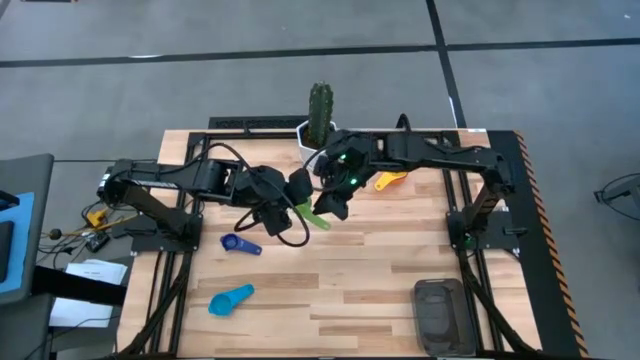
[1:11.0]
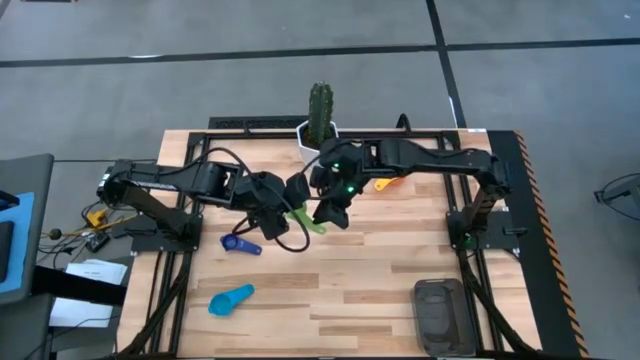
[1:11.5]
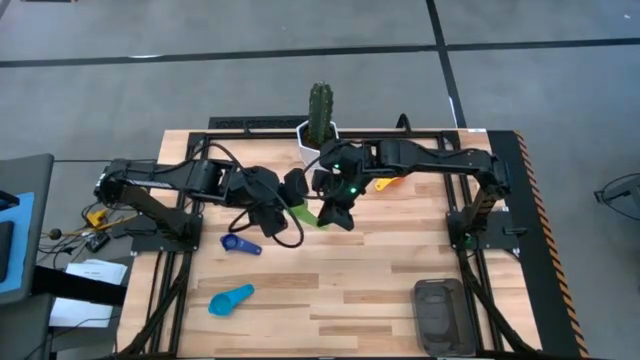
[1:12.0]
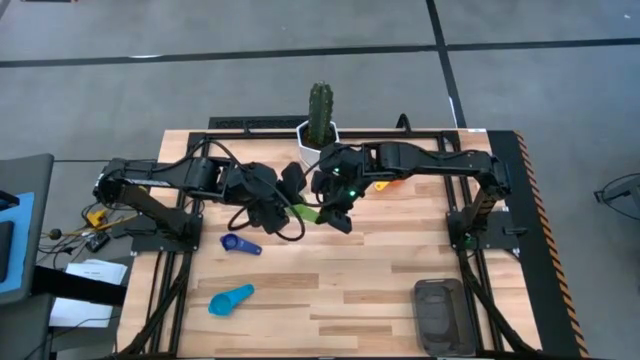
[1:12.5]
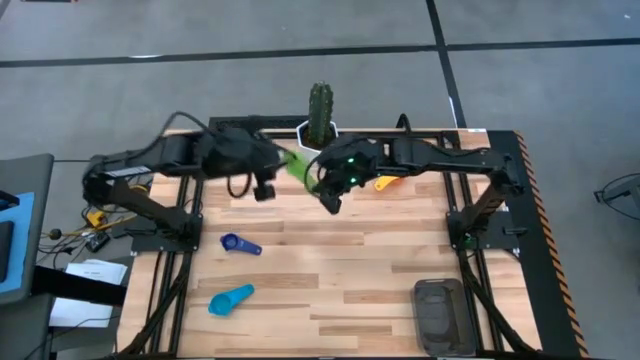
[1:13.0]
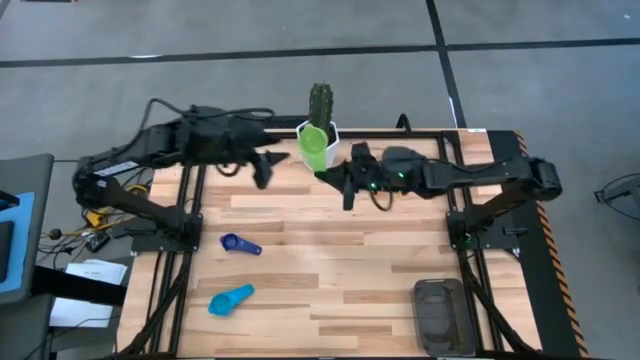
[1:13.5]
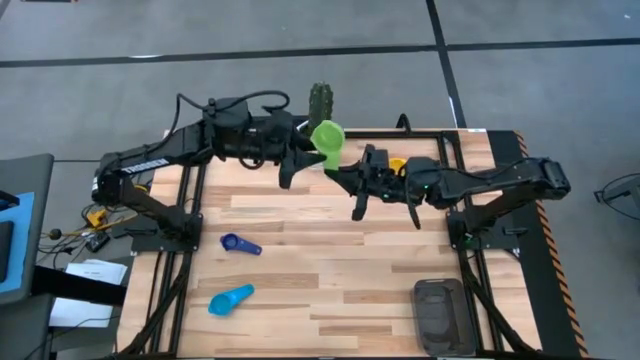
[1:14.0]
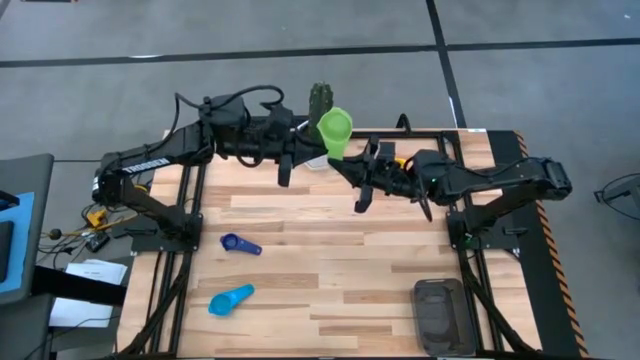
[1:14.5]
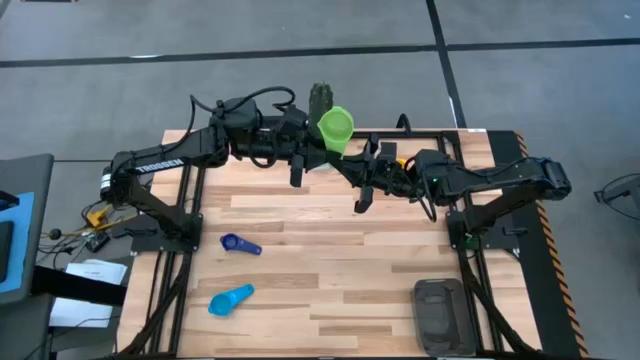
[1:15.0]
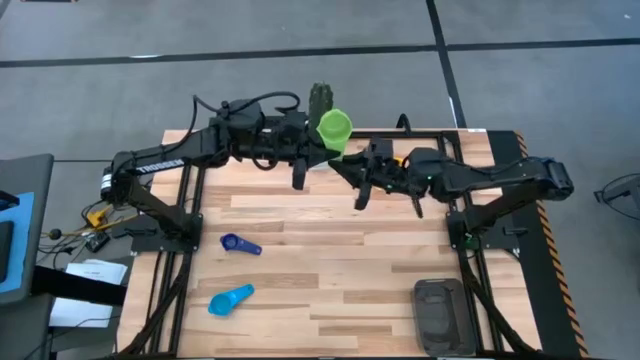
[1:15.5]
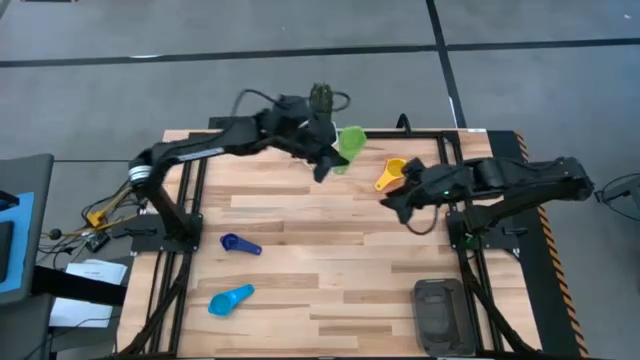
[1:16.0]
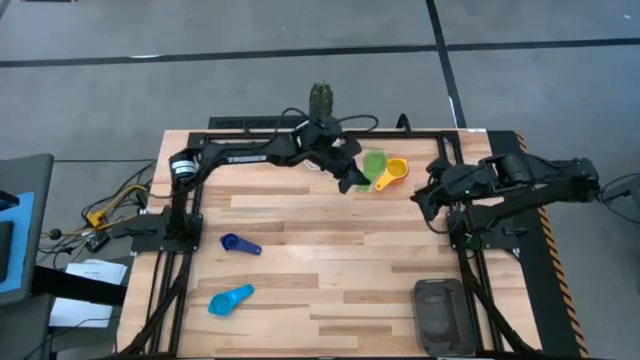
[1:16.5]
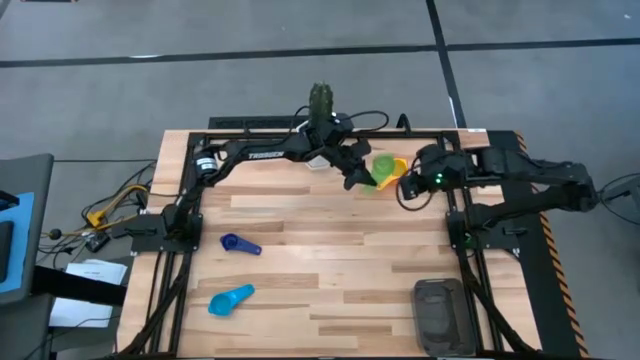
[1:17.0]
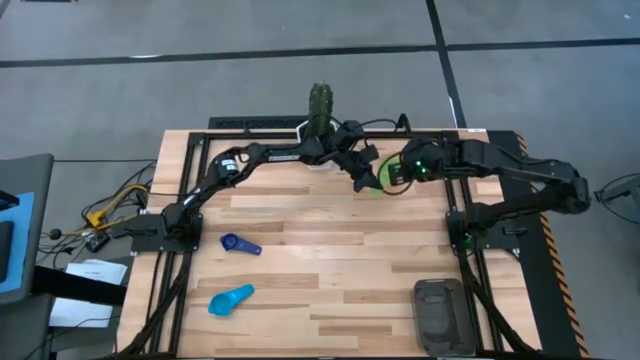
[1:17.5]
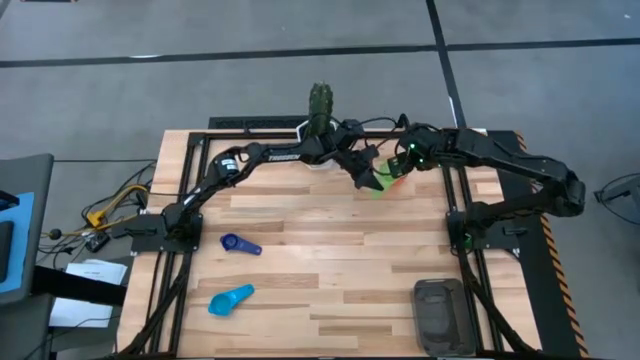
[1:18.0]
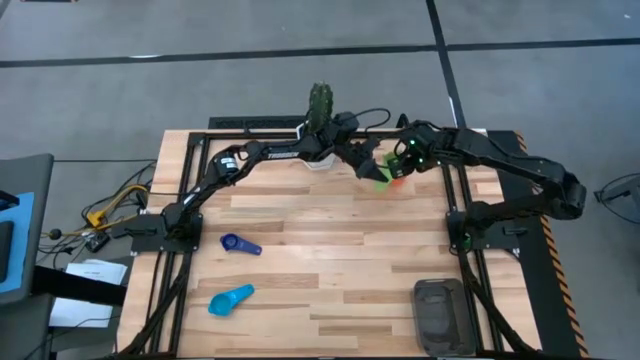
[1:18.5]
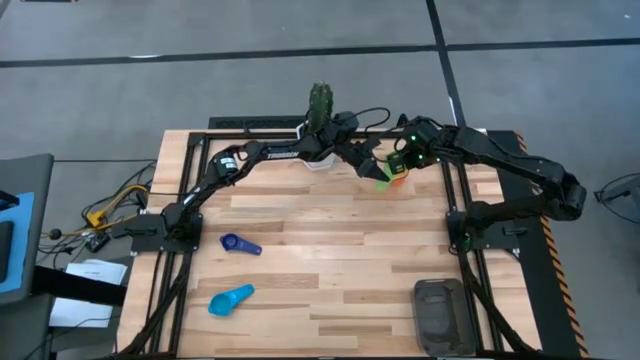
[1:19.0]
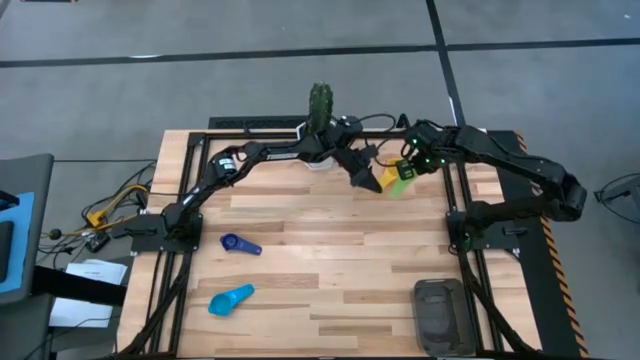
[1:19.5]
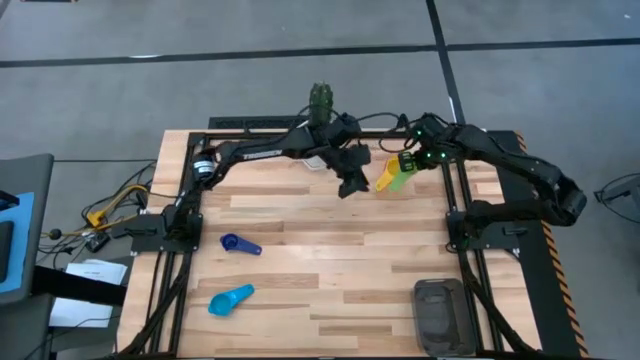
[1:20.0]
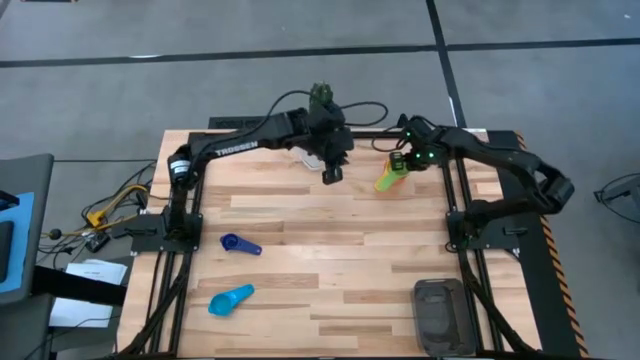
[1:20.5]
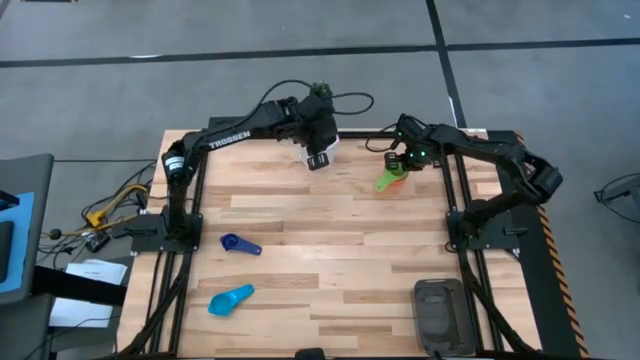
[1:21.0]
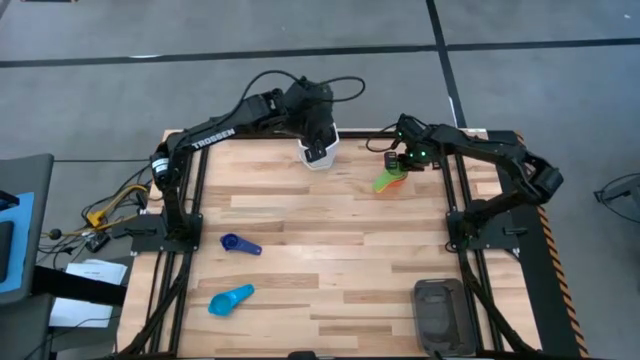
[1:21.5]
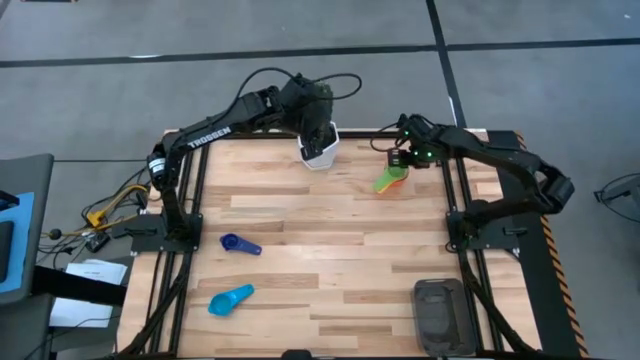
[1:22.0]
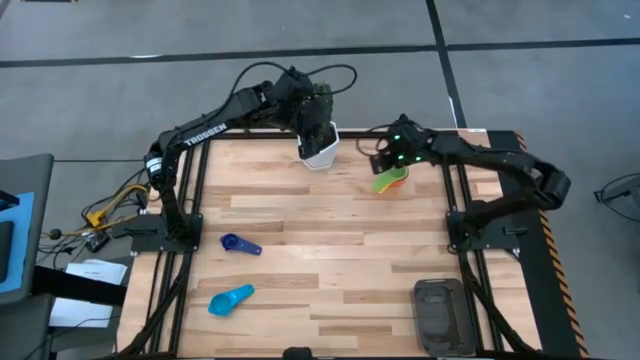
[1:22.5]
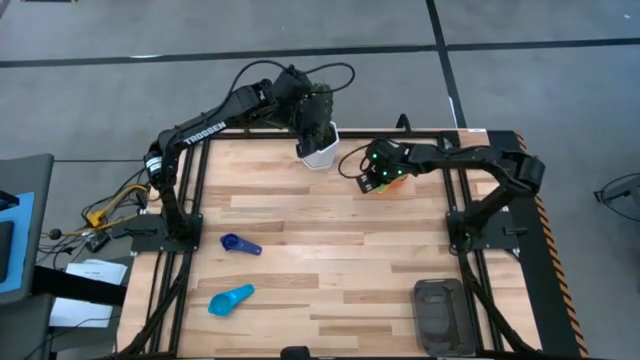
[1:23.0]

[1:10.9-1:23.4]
Task: Nest measuring cups in basket
Stack the green measuring cup on top of the yellow measuring cup

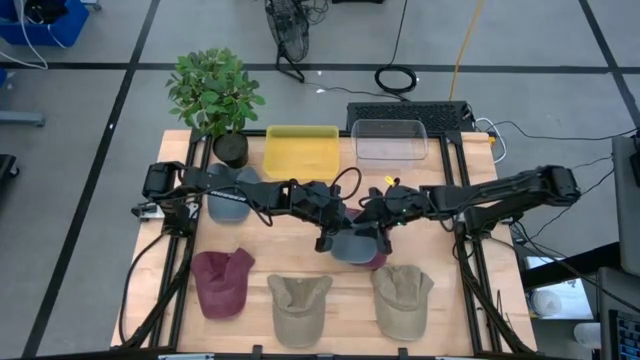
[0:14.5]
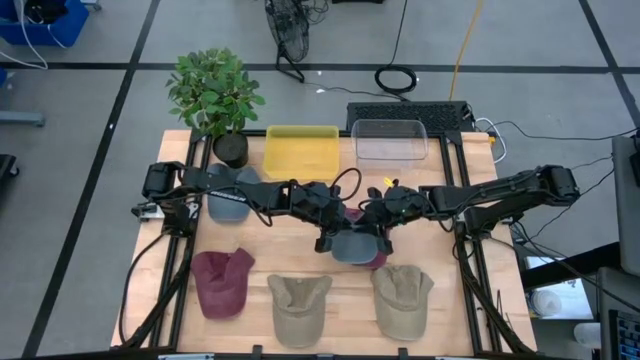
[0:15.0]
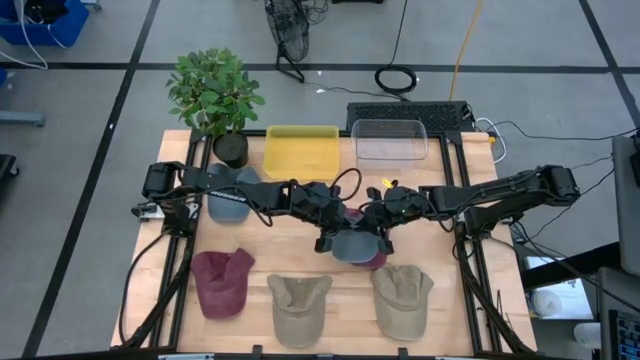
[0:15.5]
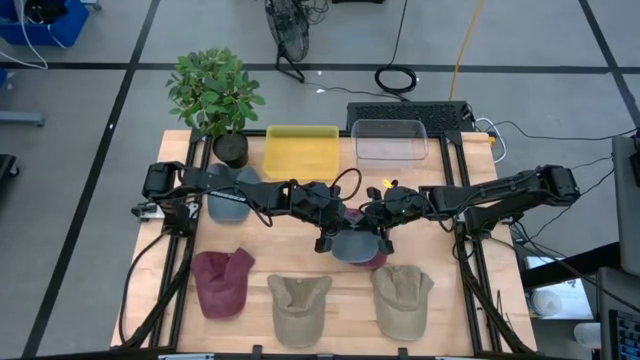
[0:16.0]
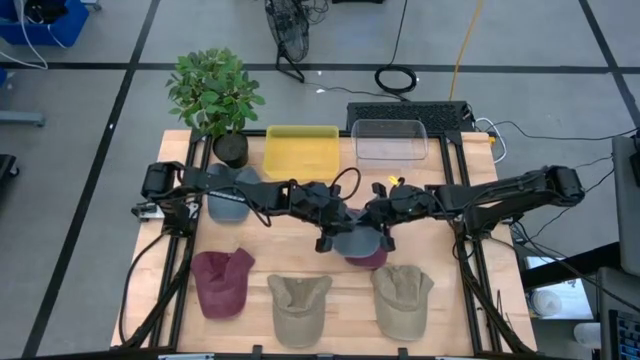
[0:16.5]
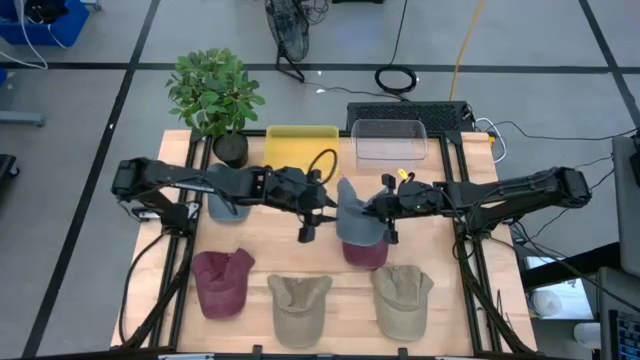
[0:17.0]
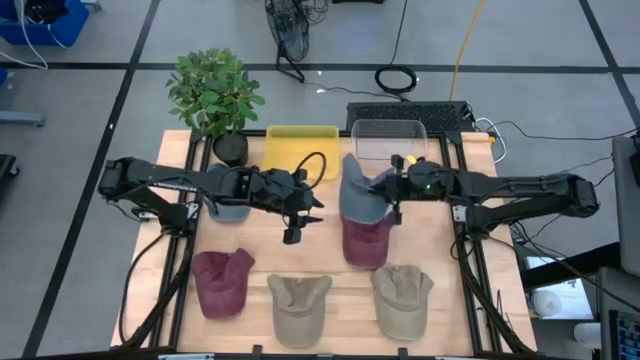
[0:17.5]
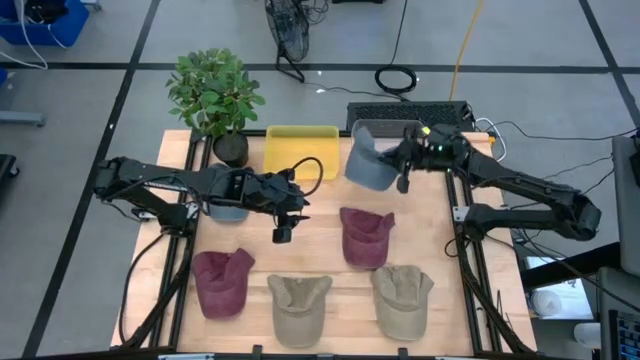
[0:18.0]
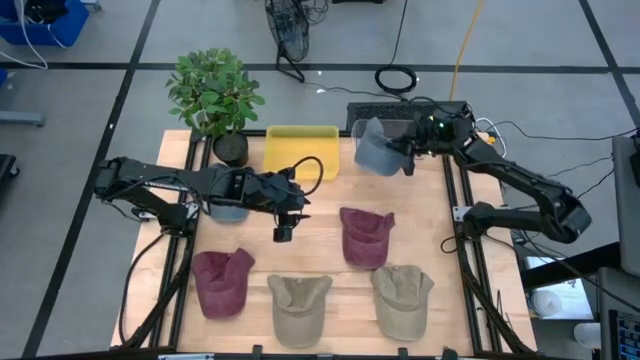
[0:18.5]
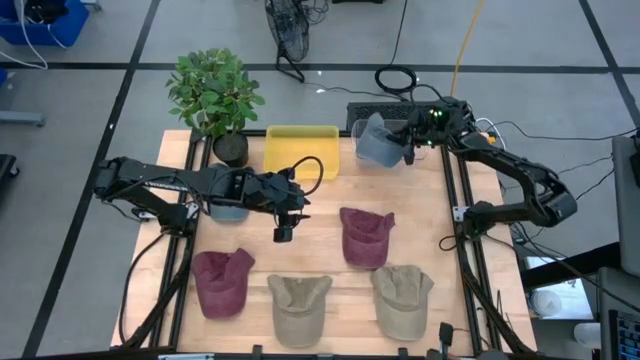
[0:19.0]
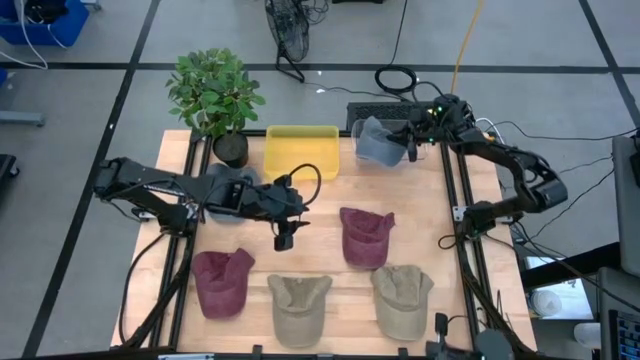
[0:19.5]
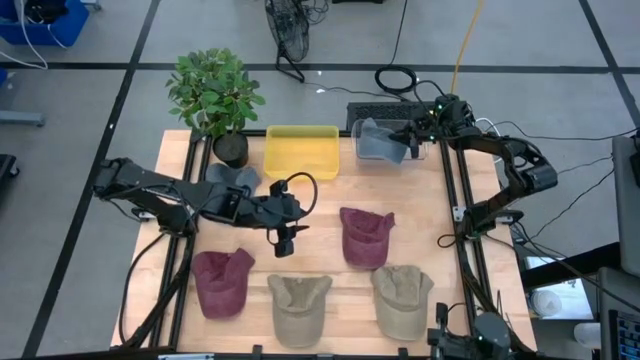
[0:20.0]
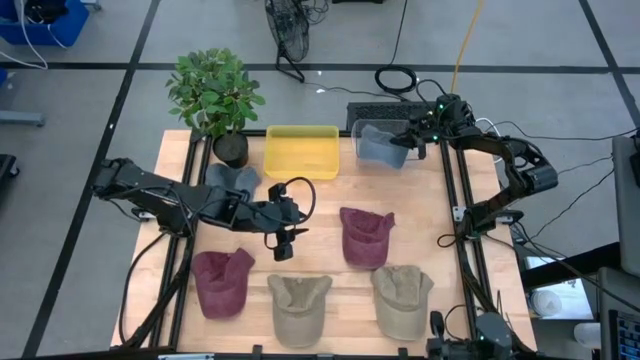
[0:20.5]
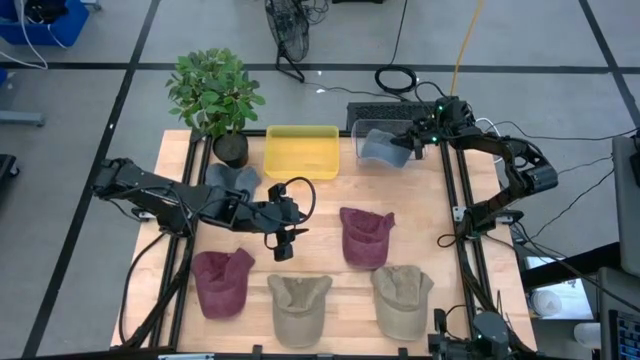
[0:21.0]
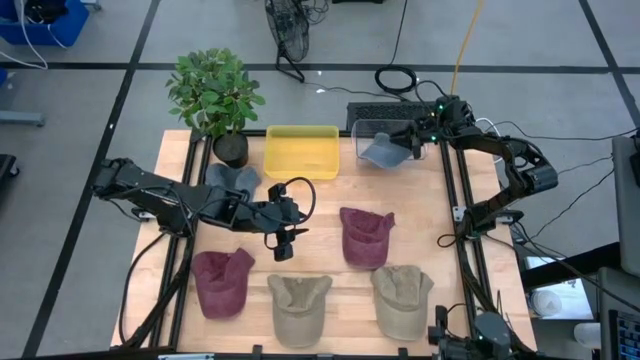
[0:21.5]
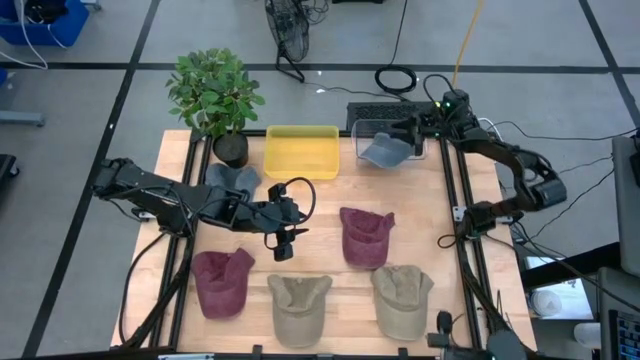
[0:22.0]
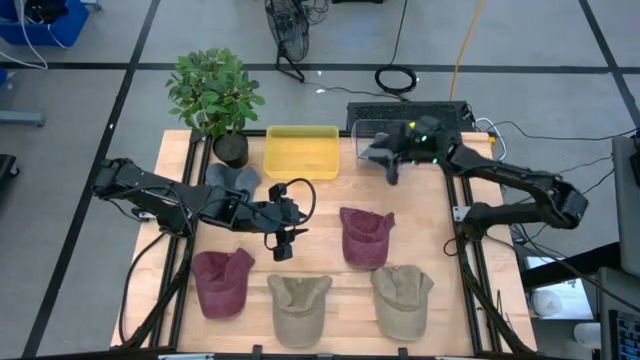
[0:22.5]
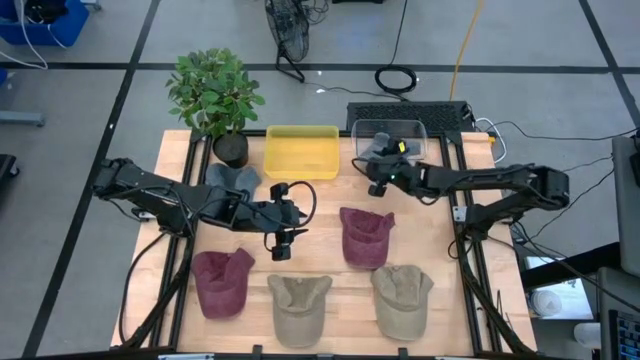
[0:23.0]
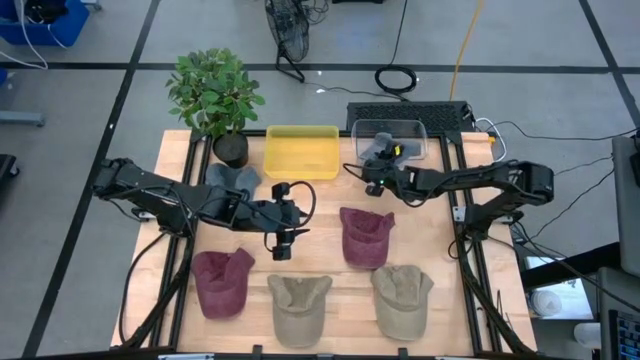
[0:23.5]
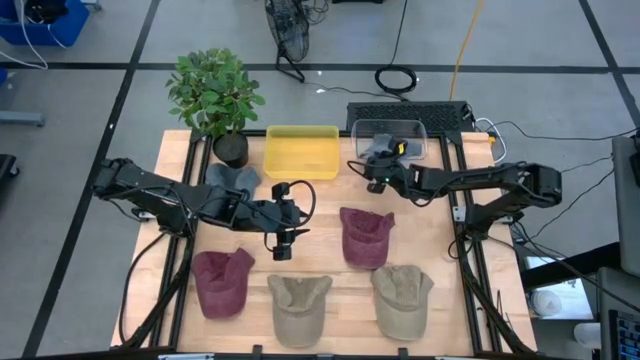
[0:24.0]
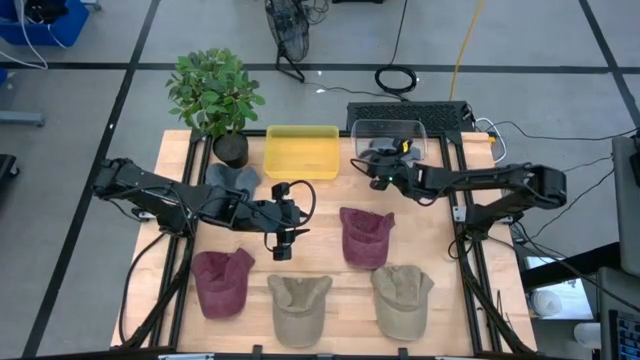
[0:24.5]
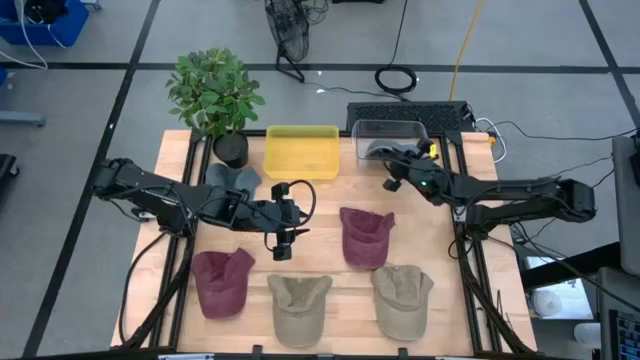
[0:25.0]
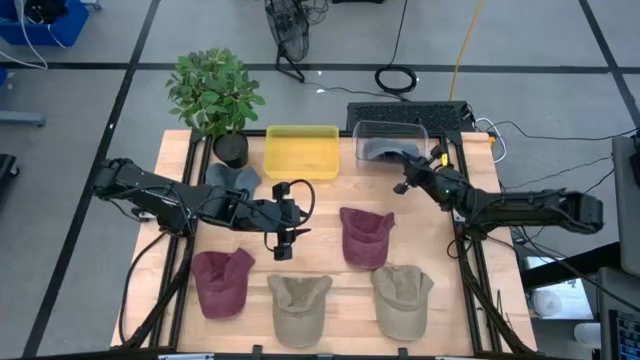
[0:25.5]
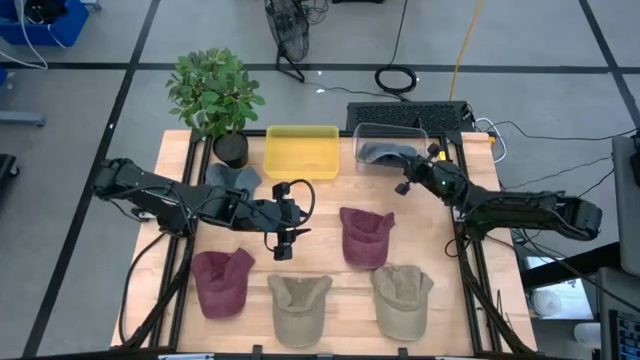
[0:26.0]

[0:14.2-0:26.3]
Task: Pick & Place hat
Put the right blue cap into the transparent bin
